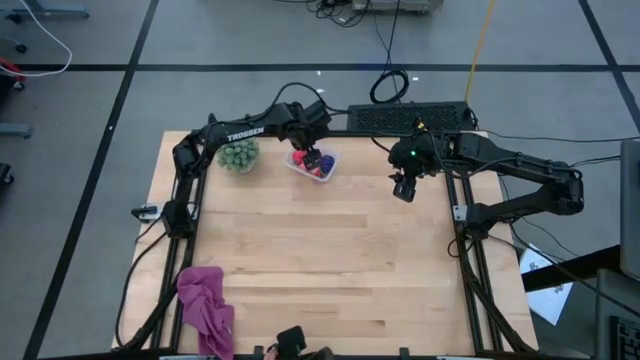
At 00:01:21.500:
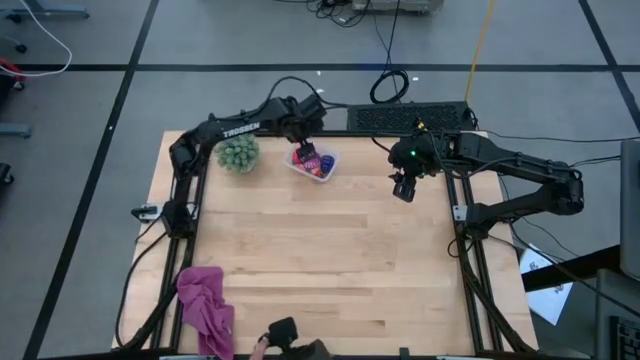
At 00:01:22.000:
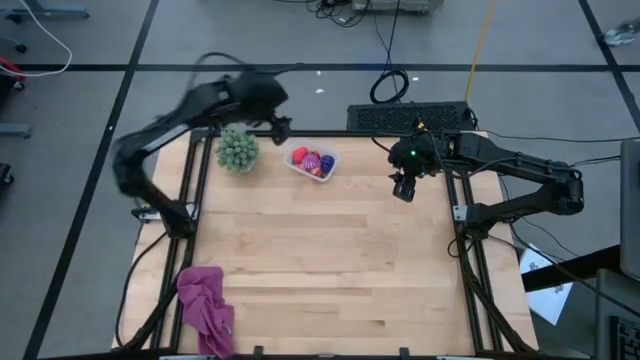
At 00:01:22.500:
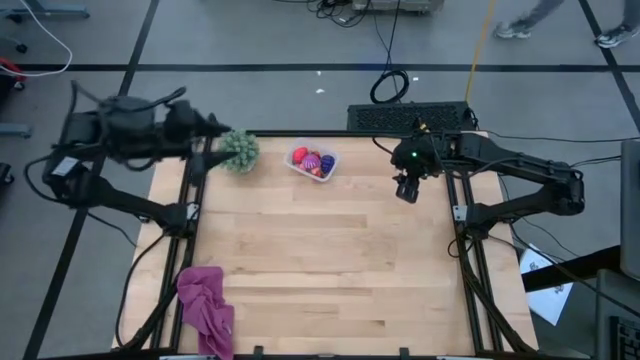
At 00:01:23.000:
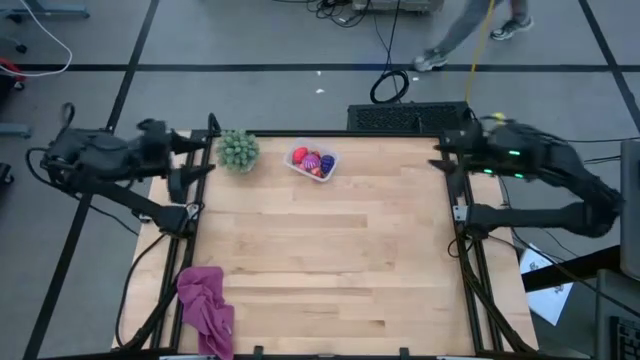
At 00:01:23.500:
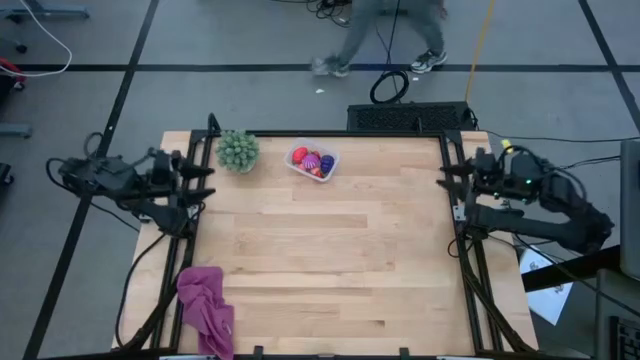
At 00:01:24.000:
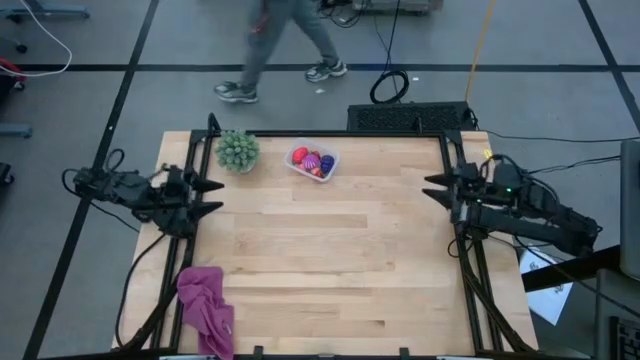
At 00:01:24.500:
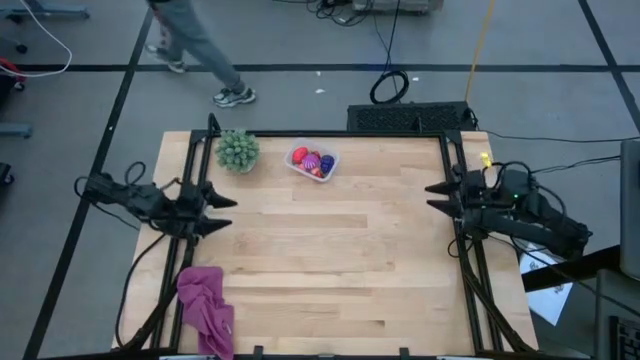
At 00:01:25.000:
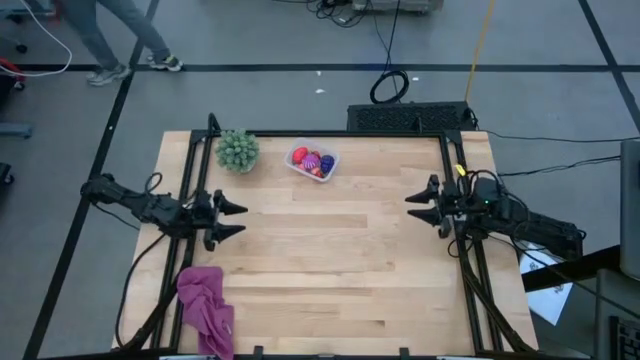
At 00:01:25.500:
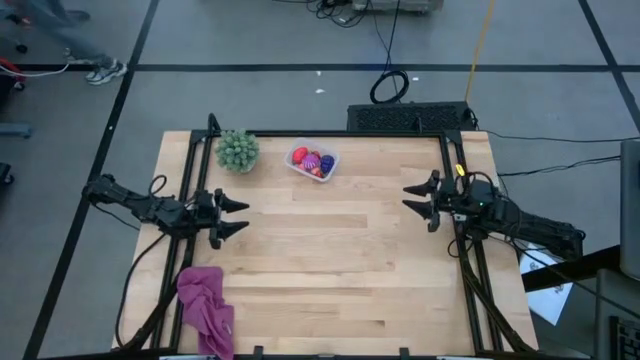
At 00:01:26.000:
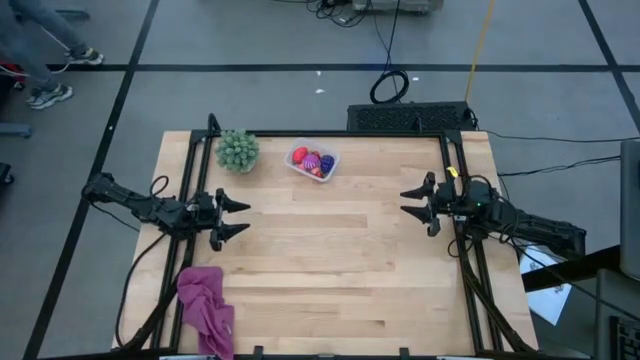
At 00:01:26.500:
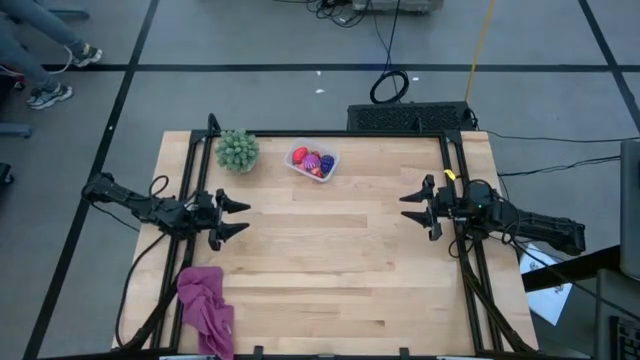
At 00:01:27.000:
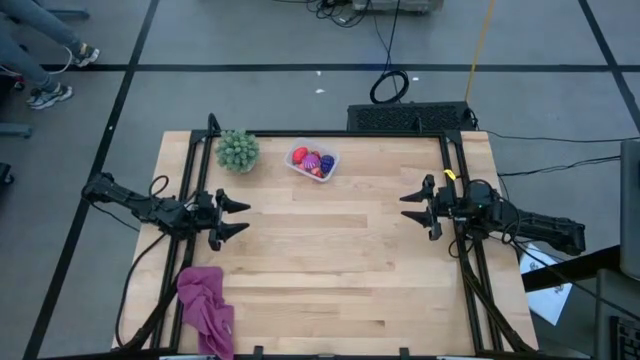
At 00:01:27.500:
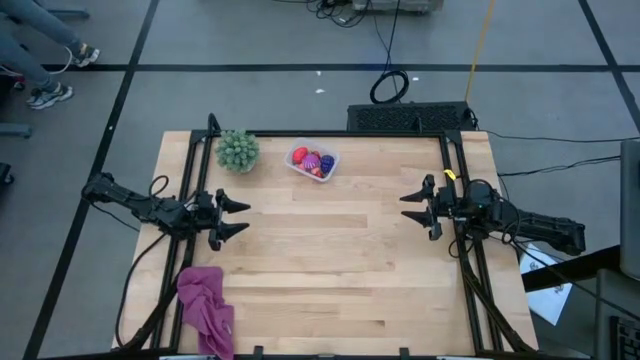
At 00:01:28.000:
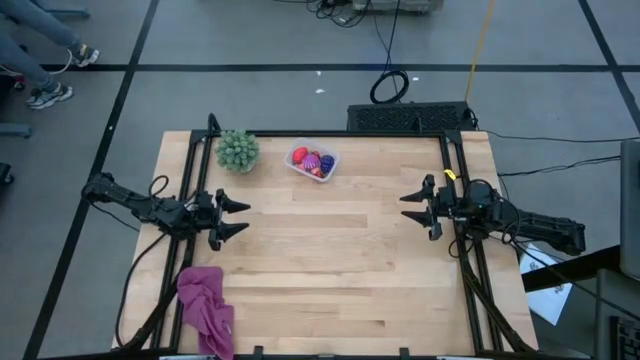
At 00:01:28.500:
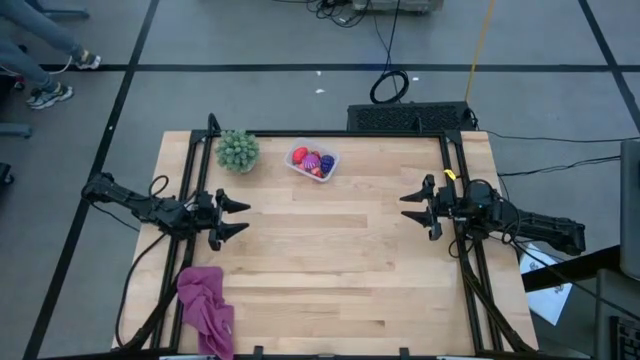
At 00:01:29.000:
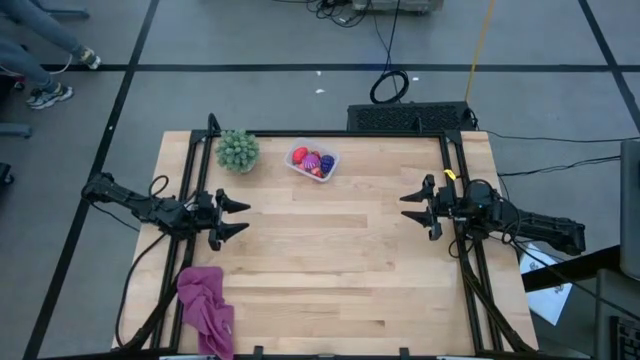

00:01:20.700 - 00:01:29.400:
Task: Pick and placing Produce into tupperware
Return to Home Position

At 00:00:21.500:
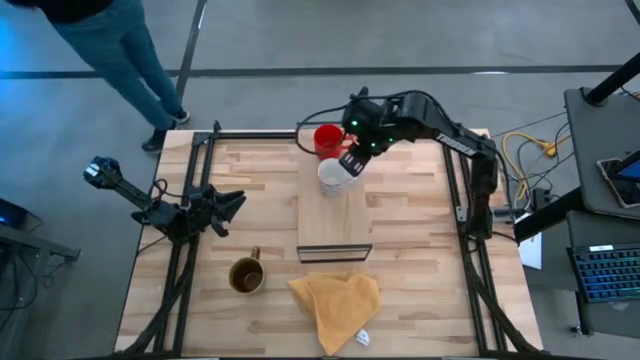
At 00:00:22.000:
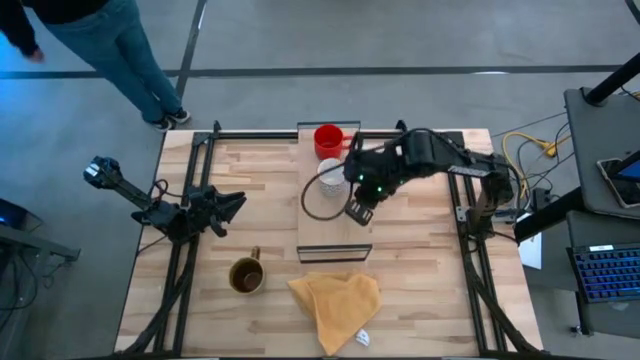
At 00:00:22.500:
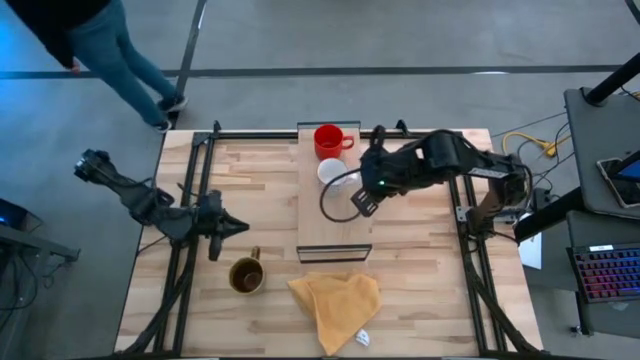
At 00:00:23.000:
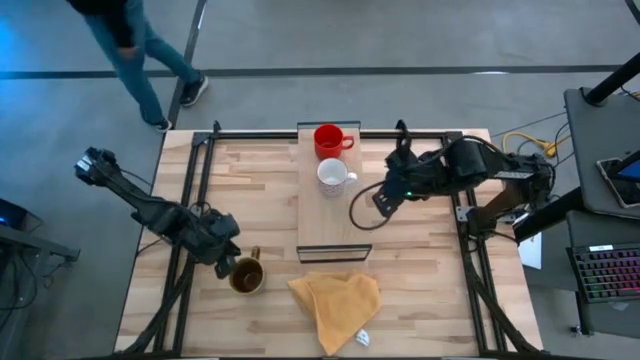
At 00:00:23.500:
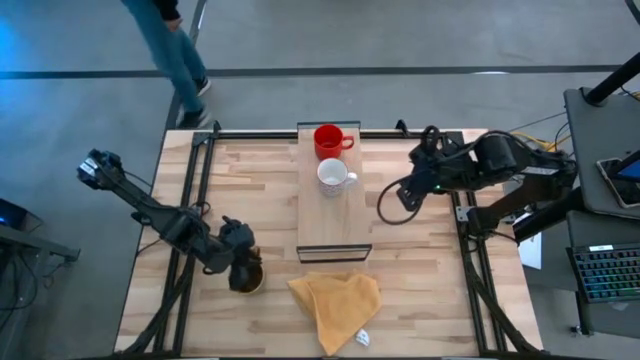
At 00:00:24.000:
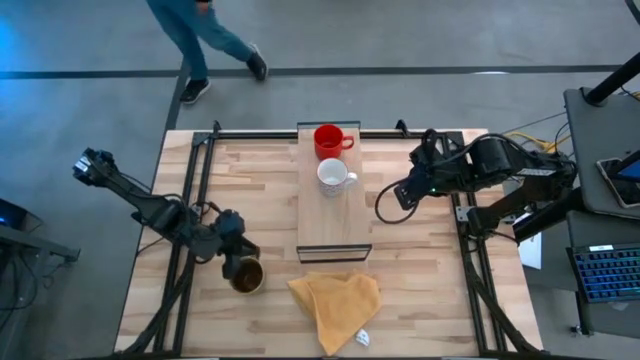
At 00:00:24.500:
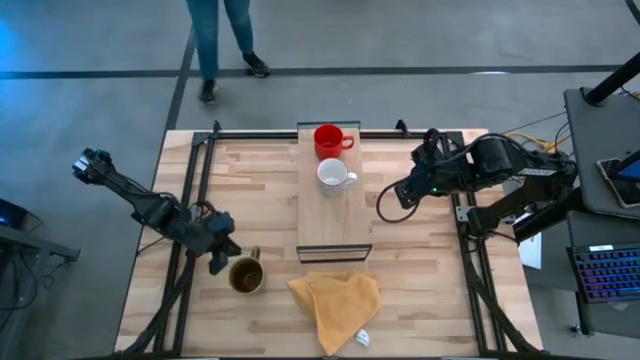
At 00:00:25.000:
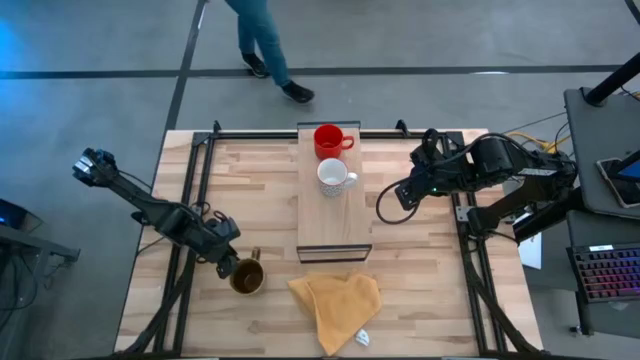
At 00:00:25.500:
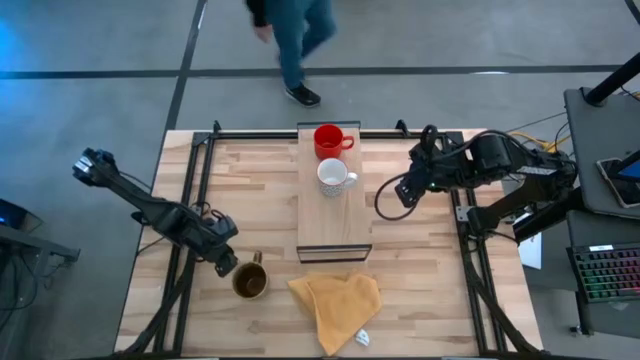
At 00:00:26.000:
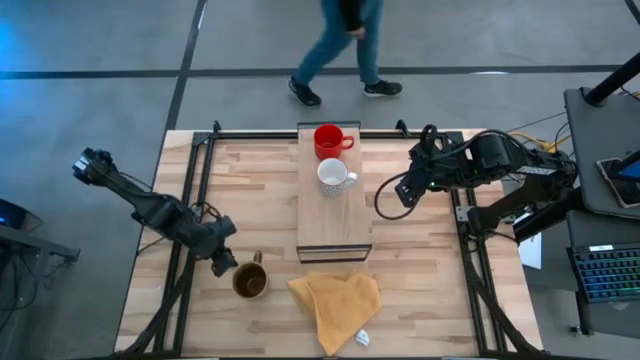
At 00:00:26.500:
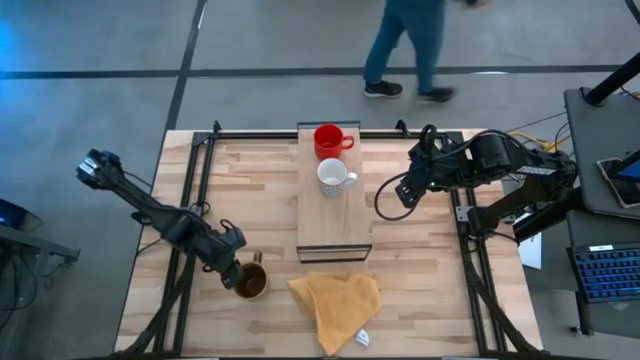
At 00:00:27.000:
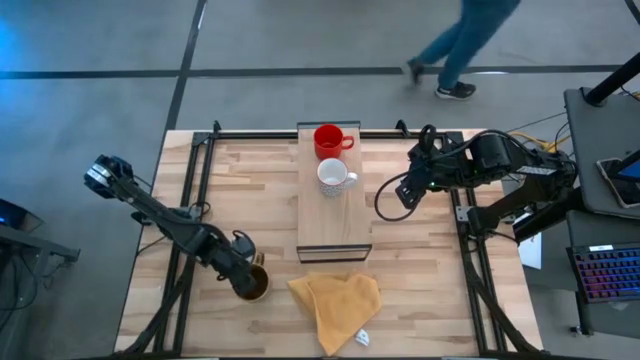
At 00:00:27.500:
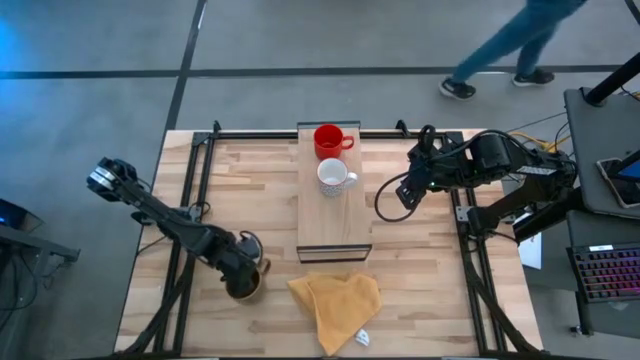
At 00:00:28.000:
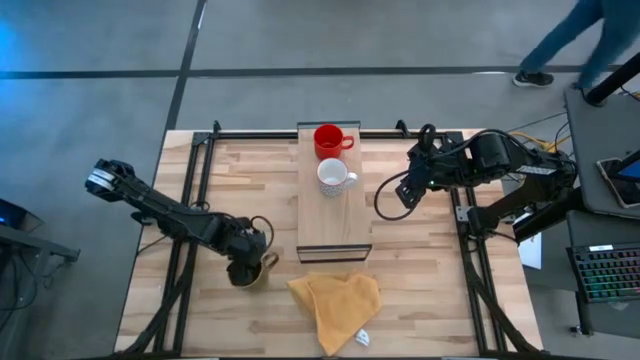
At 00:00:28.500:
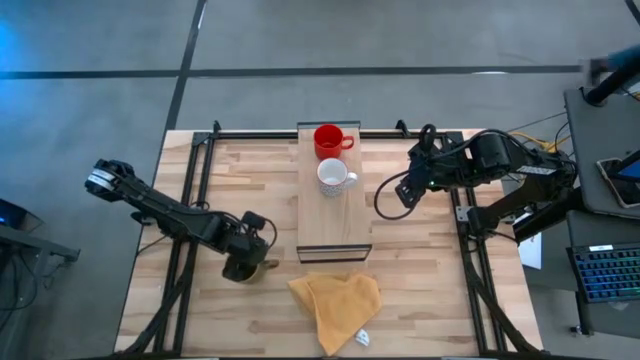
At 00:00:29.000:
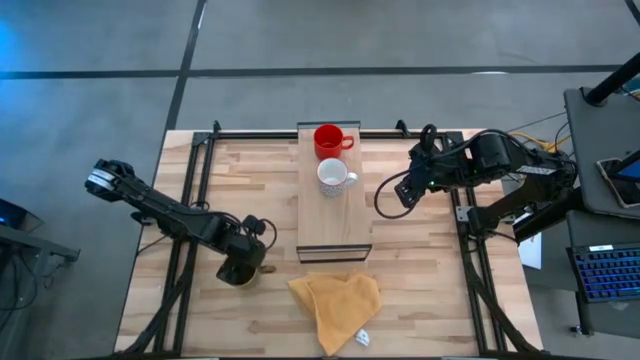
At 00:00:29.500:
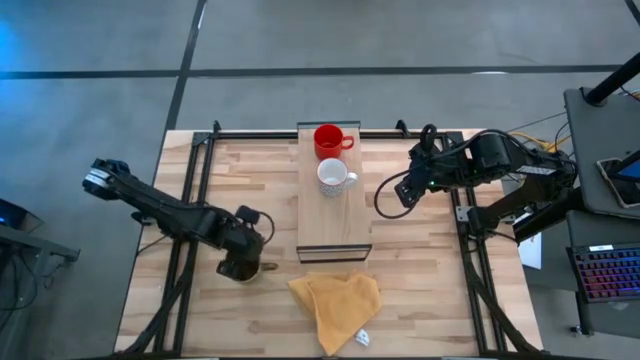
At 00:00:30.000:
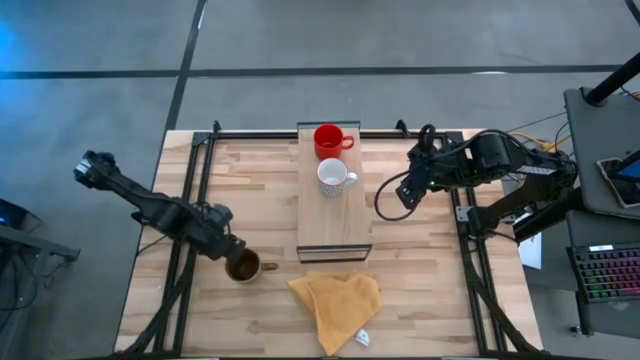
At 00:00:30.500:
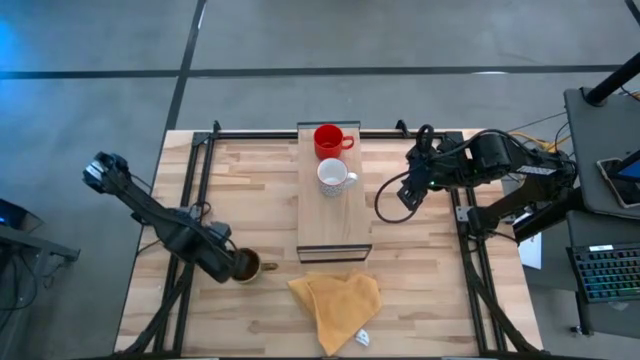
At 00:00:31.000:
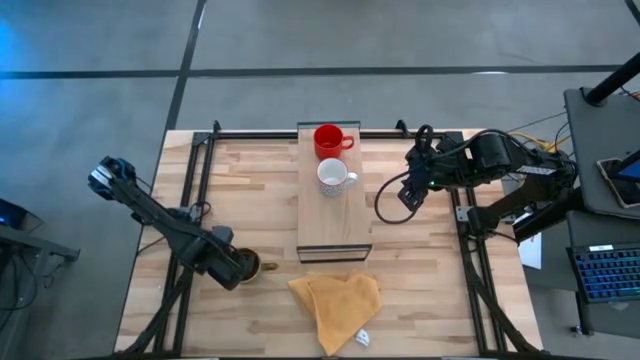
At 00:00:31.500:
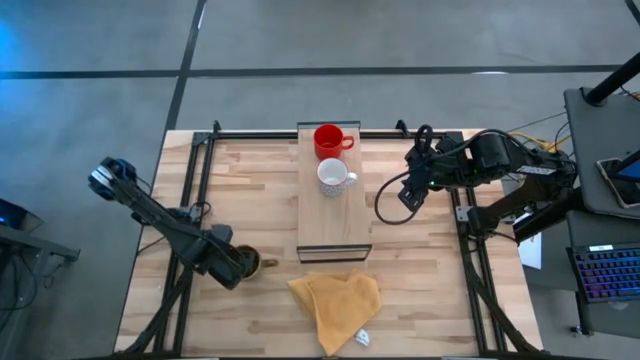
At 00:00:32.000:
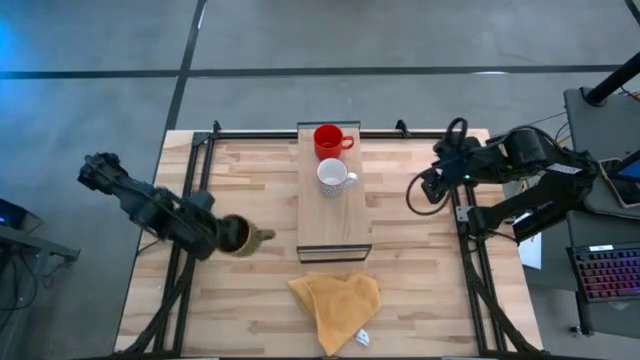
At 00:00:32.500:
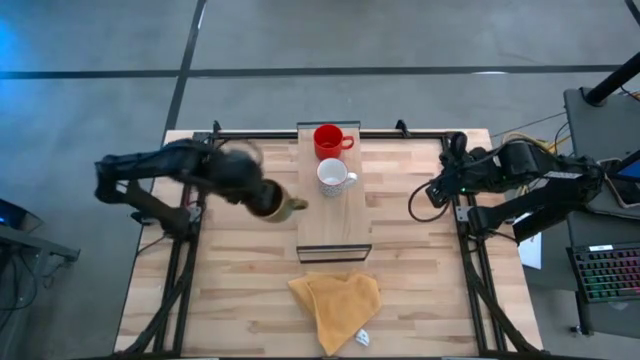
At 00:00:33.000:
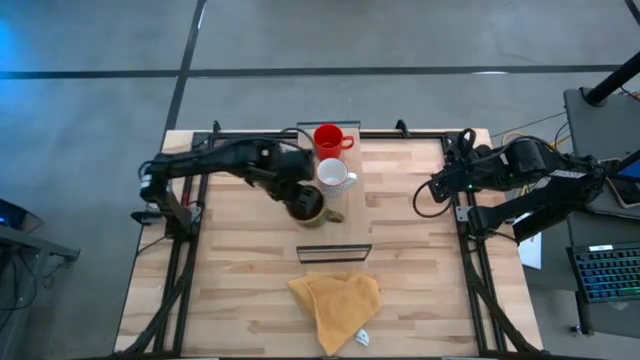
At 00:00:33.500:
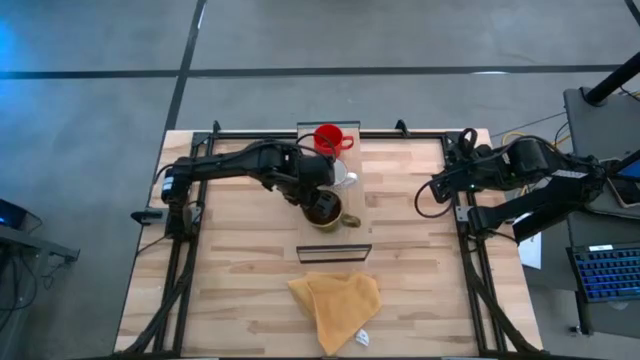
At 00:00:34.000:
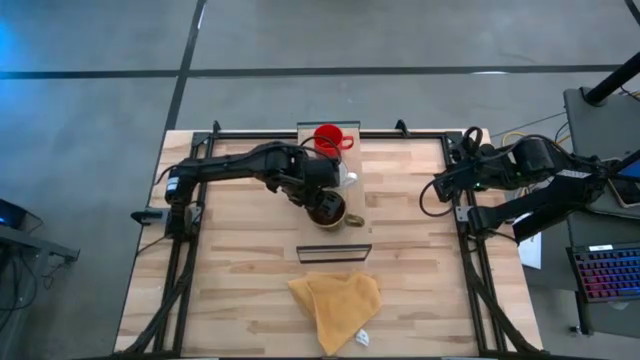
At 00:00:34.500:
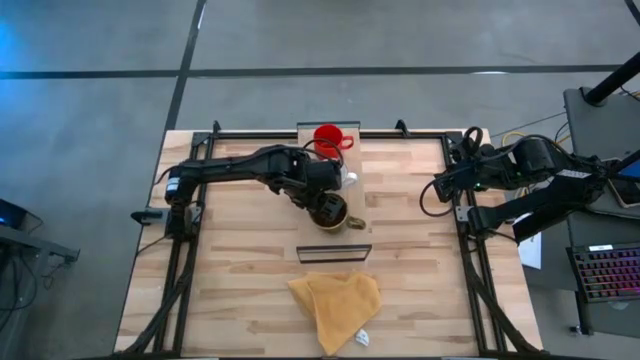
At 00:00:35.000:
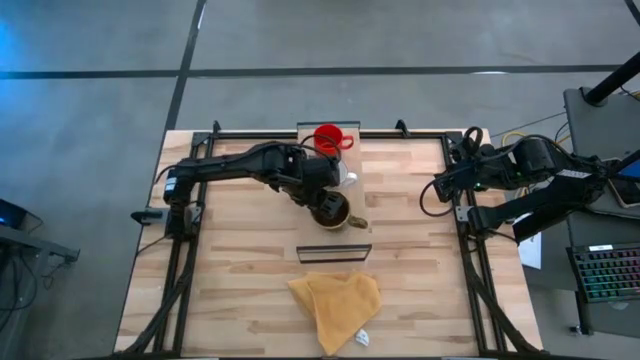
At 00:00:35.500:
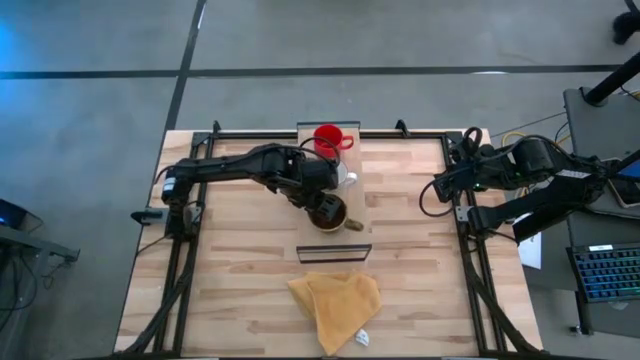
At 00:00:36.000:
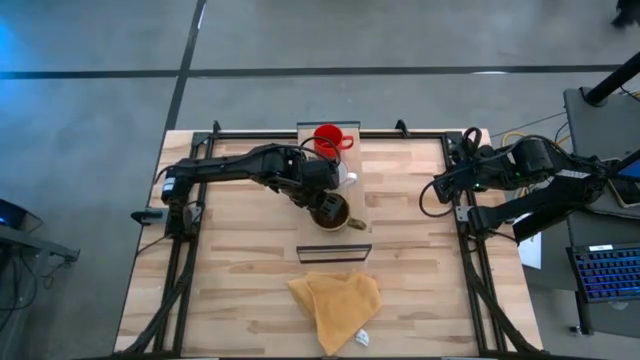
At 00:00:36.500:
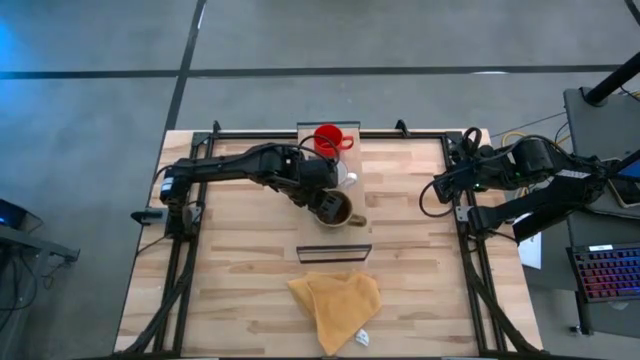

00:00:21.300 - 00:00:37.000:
Task: Stack small to large cups/mugs on shelf
Put the brown mug on the shelf
